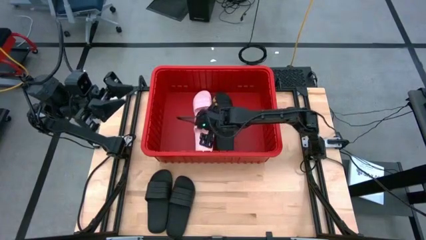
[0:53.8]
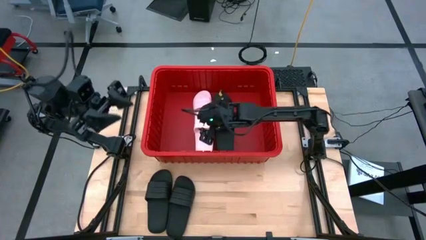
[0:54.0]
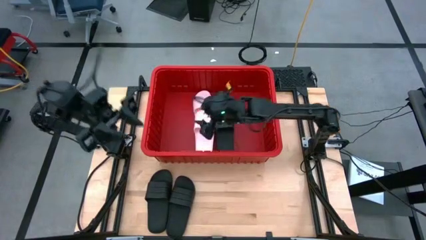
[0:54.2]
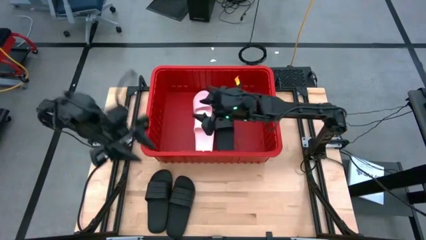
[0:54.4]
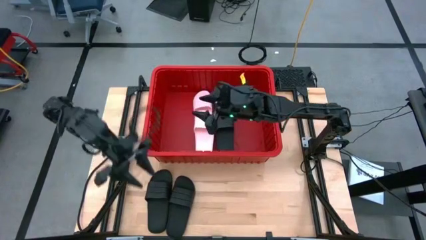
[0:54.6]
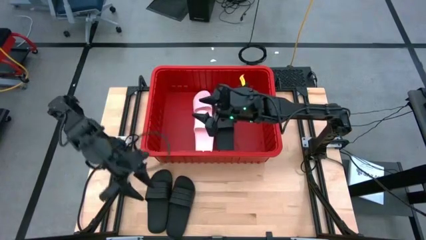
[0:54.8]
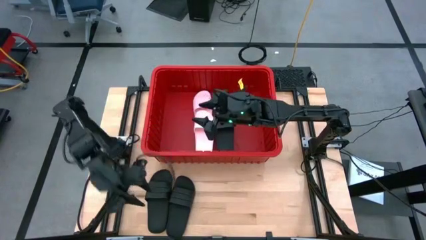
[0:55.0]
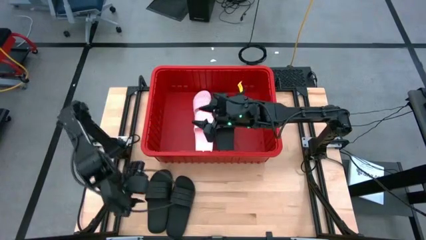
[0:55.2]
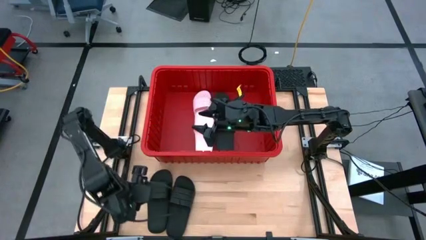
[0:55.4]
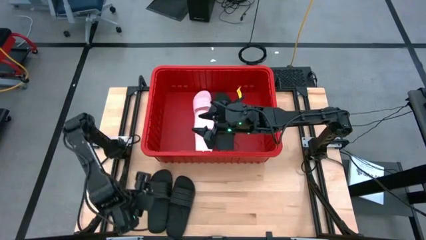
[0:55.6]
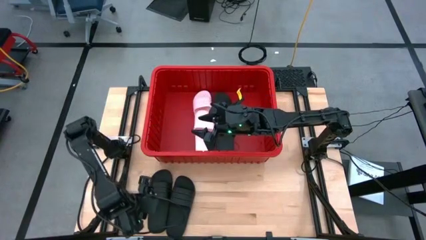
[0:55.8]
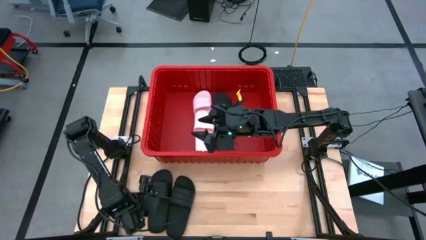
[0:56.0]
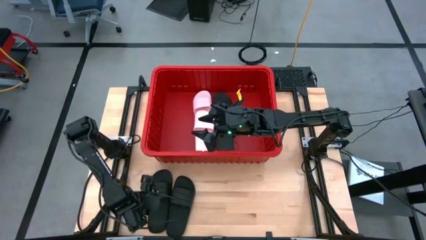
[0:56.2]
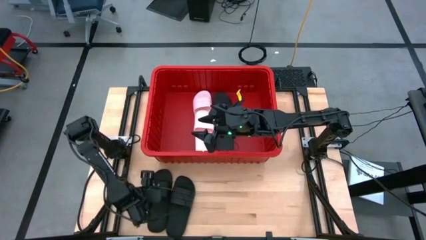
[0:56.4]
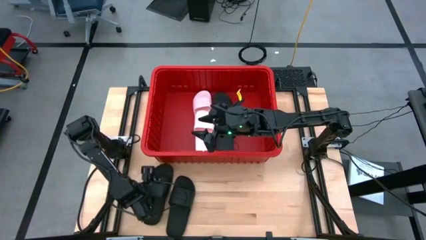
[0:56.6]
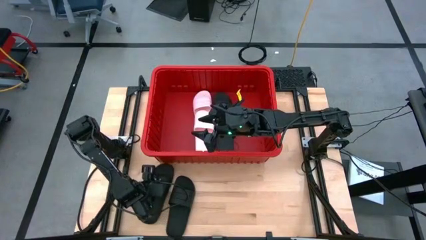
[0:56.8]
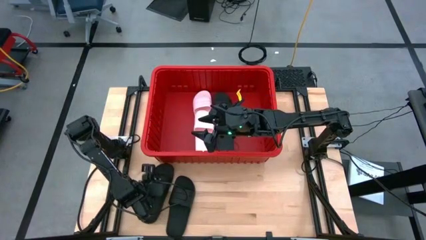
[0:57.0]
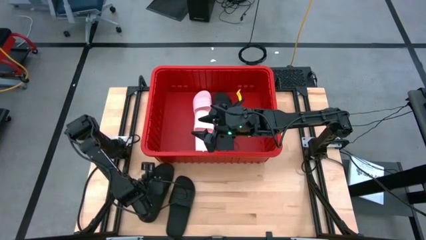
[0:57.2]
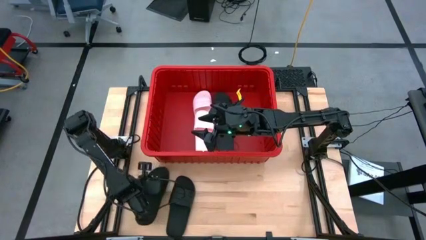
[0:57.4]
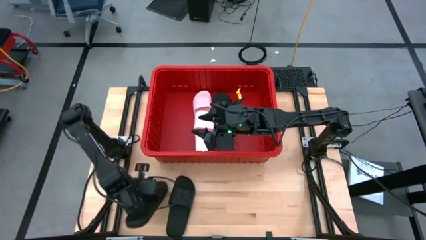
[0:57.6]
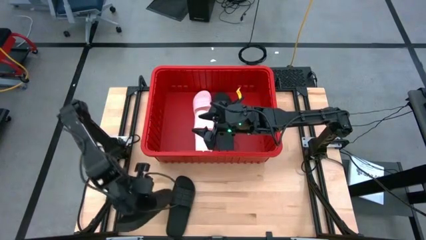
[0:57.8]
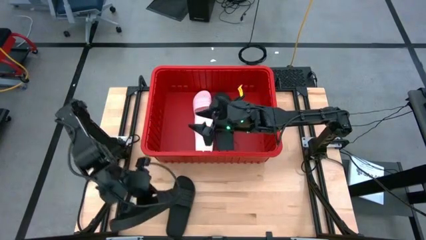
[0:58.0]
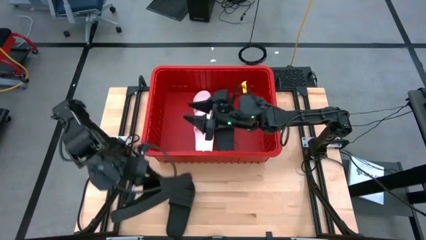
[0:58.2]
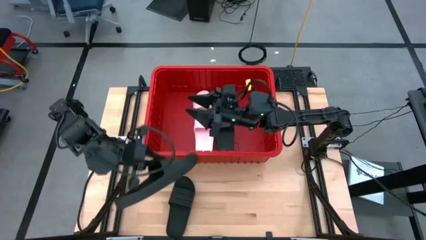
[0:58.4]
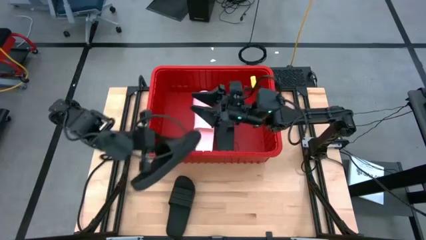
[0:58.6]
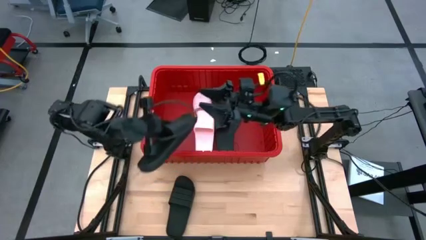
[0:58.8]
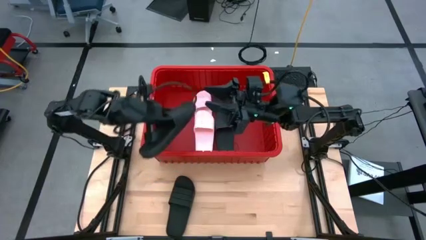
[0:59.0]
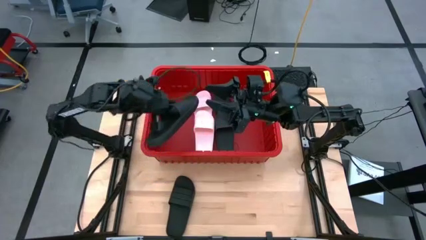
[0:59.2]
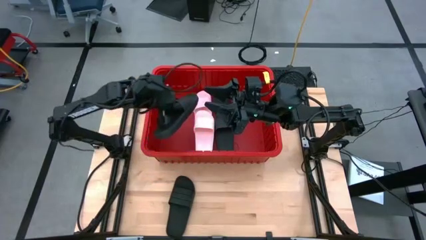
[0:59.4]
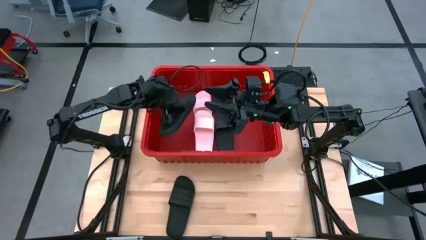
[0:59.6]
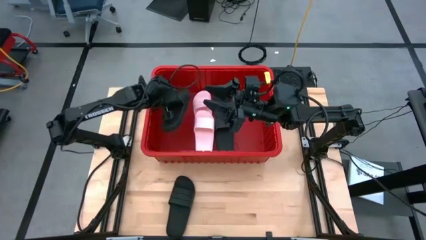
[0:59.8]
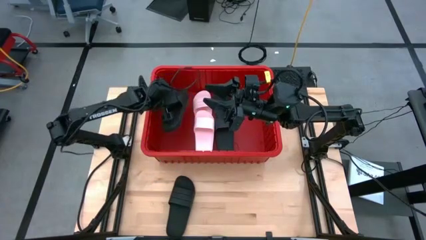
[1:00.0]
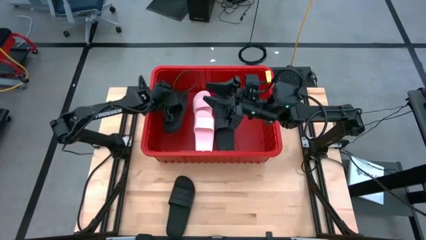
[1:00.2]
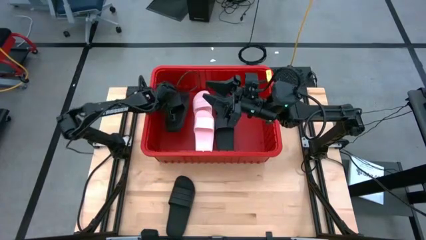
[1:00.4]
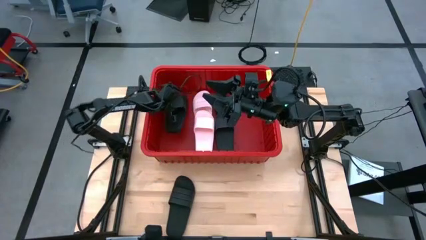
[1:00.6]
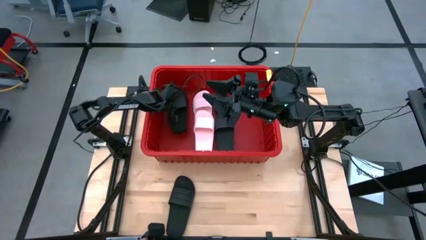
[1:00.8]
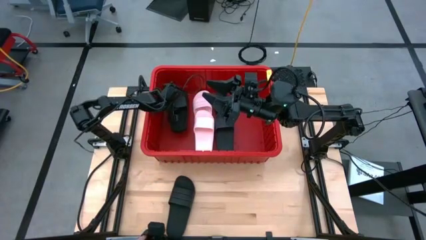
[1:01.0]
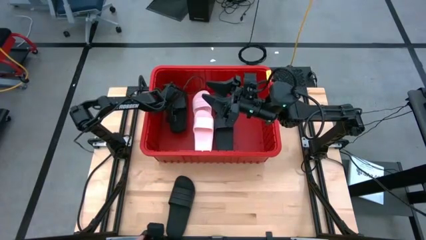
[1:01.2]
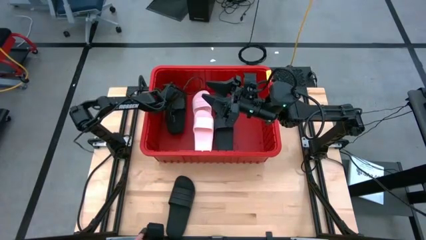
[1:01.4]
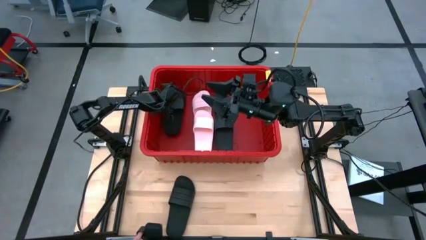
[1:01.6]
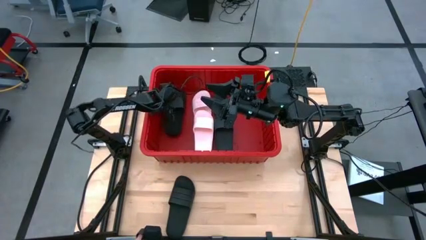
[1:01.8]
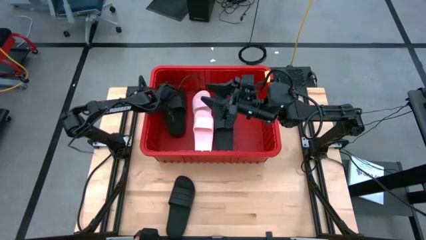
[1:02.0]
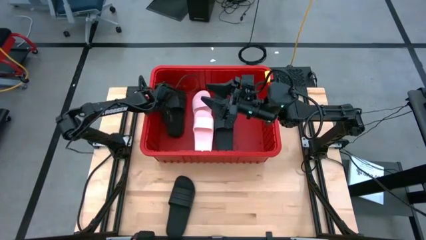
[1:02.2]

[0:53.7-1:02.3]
Task: Pick and place slides into bin
Put the black slide into the red bin

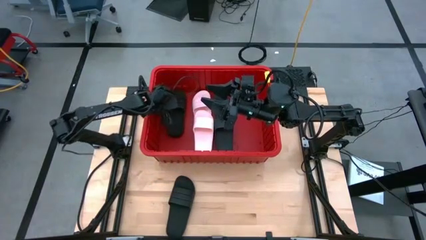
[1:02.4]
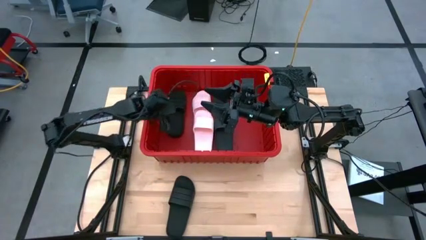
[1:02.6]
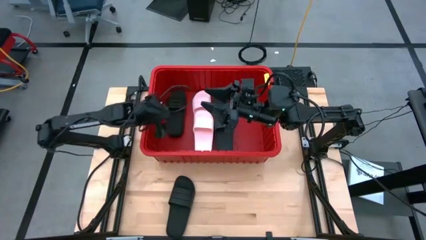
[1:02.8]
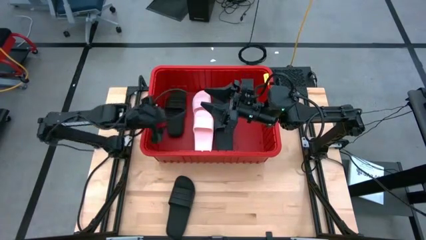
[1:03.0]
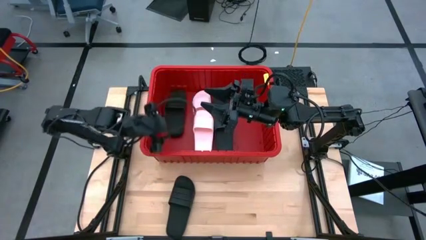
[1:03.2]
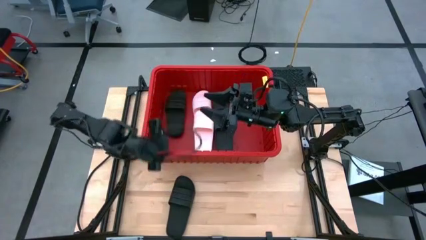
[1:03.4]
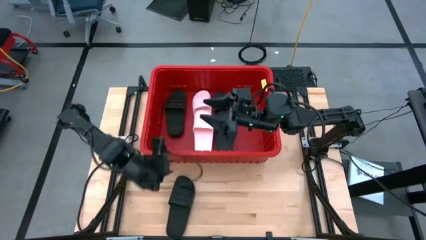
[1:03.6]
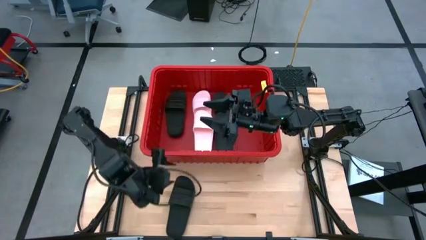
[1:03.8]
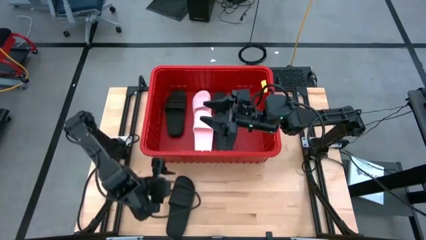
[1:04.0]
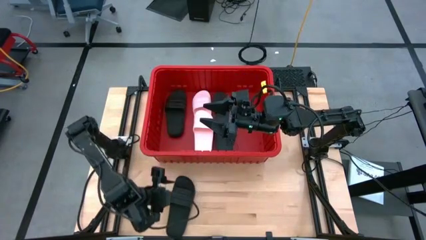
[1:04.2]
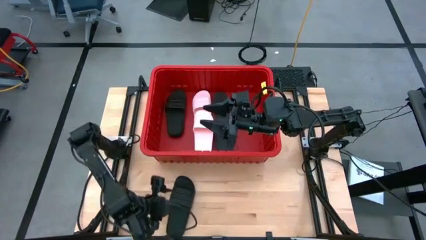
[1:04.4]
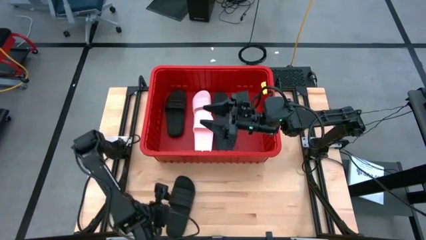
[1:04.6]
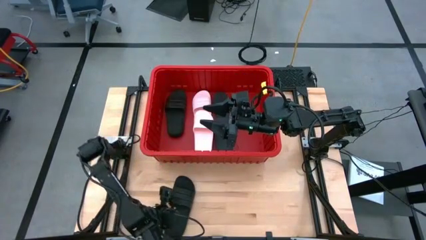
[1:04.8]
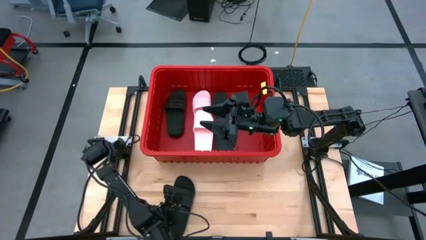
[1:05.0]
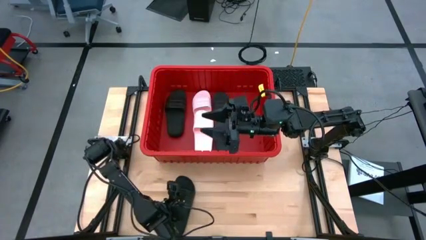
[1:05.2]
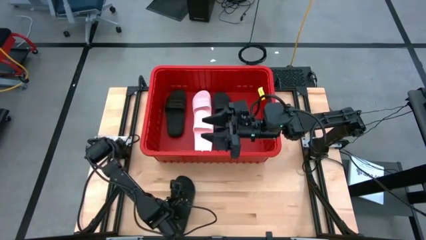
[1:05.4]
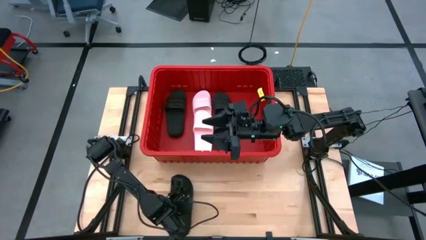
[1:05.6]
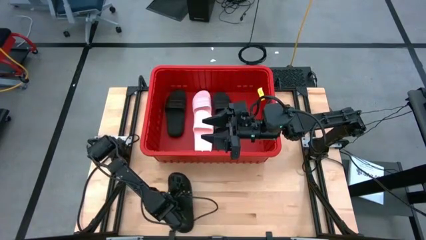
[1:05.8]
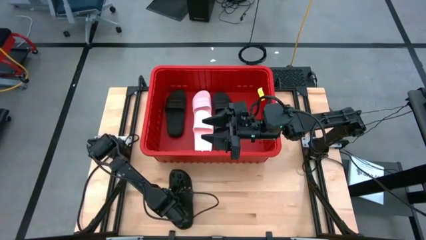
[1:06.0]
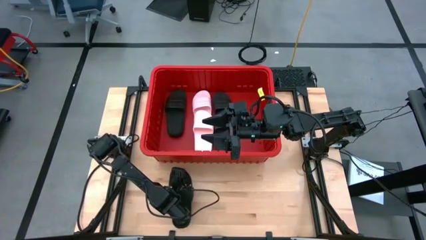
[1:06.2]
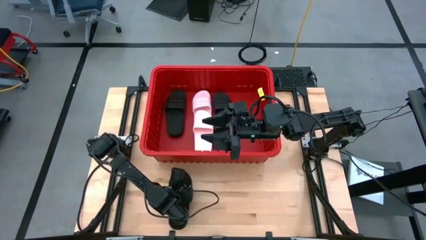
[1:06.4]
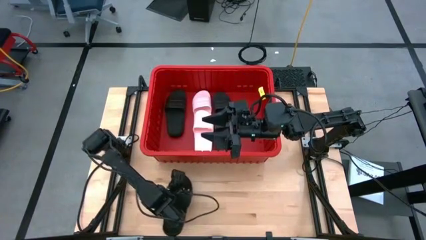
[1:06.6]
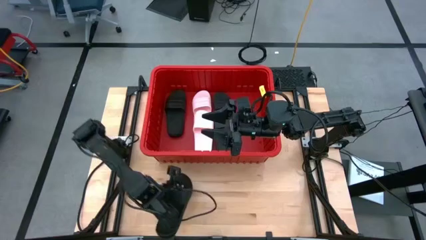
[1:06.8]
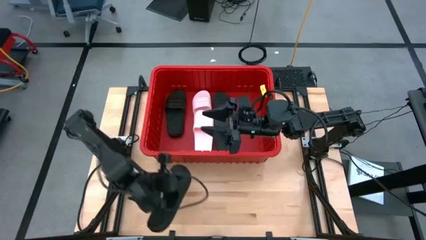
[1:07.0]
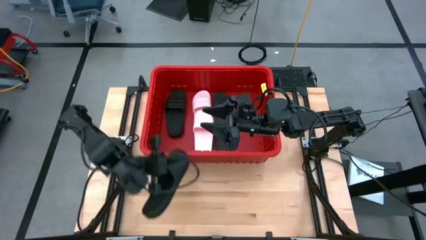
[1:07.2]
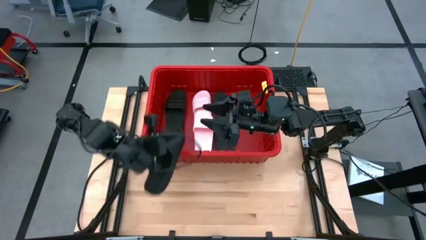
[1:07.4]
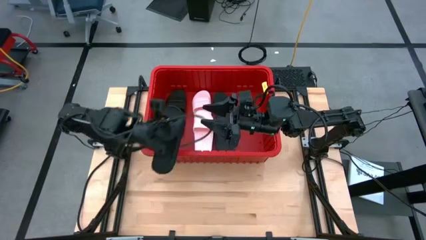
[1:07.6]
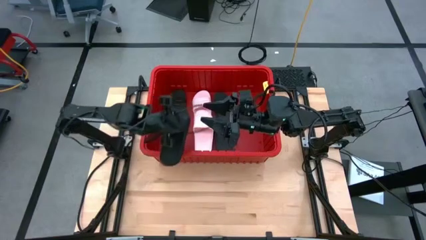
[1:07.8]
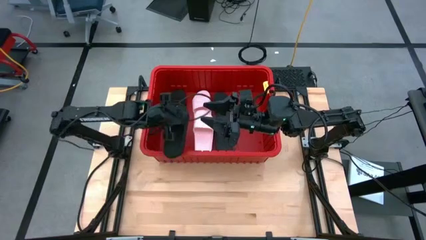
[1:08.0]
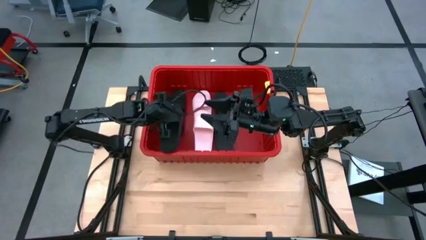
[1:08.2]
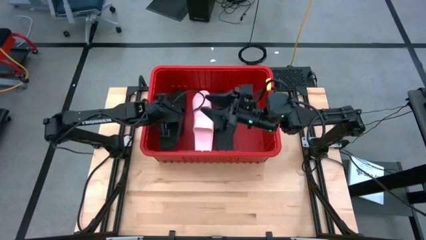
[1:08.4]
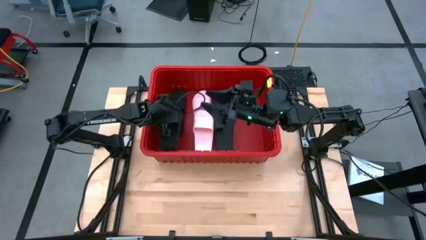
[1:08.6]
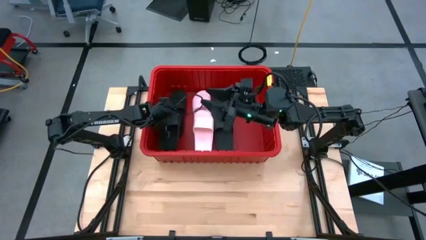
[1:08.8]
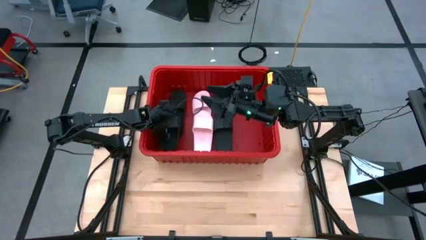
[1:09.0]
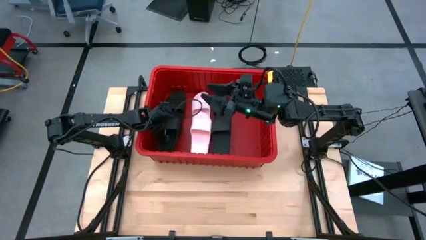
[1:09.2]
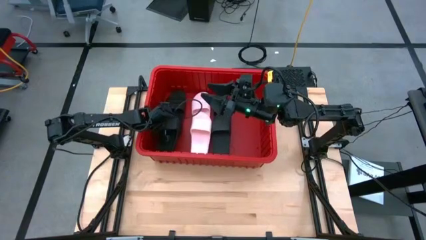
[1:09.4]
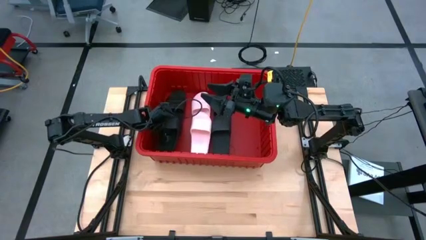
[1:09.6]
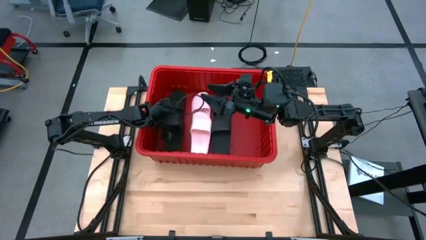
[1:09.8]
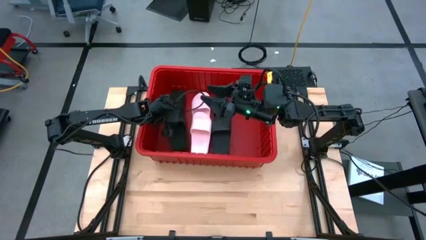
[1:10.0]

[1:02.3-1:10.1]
Put the black slide into the red bin

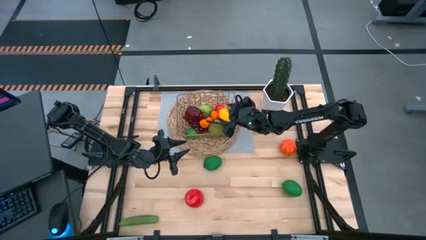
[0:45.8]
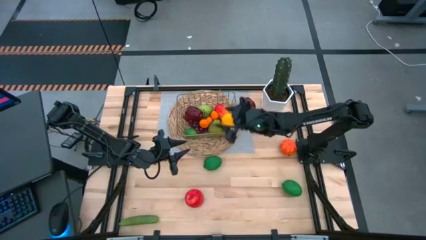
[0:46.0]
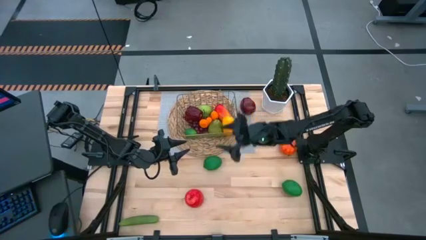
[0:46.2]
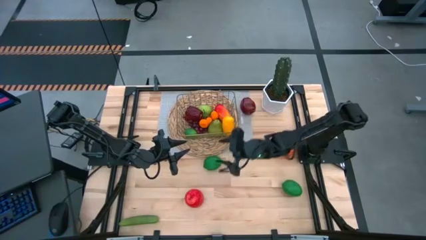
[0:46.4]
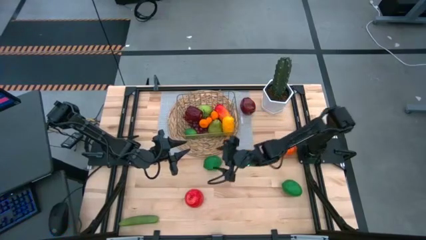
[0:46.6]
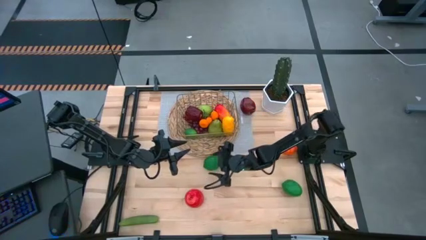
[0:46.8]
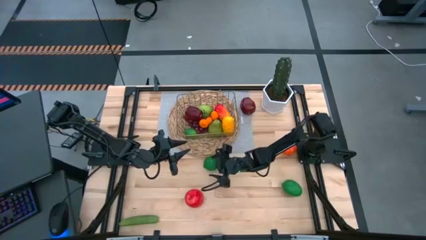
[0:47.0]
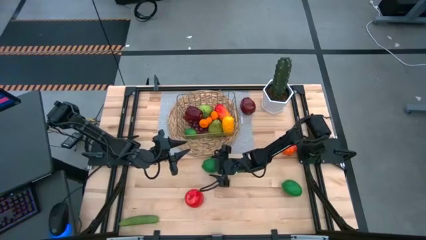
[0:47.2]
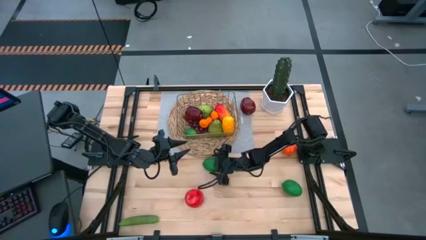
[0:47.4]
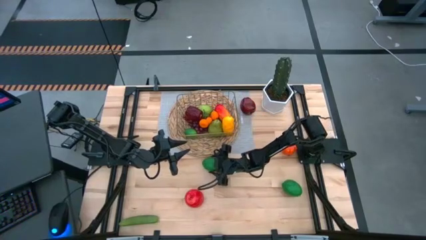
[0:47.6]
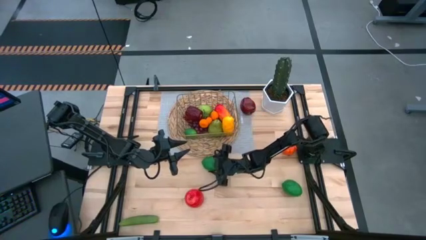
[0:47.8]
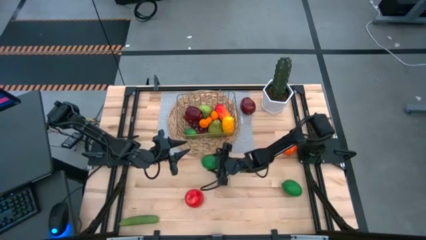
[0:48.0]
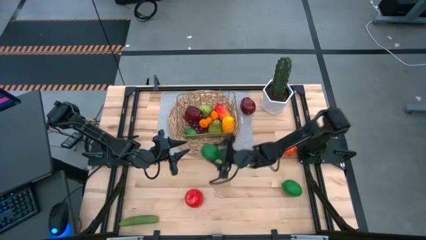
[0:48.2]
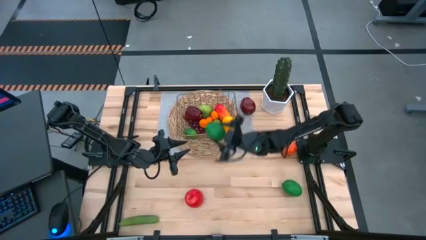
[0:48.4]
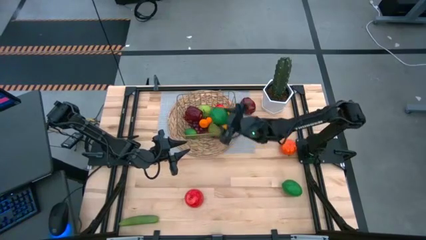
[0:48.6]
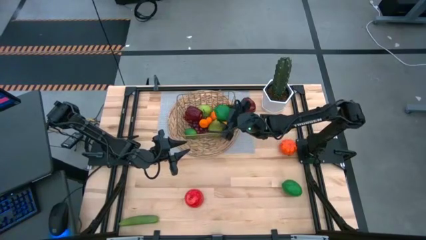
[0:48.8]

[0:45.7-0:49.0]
Task: Build produce basket
Put the left green lime into the gold wire basket
